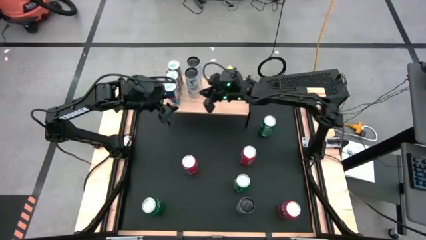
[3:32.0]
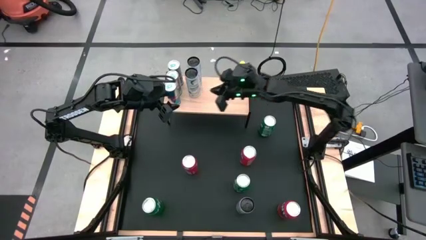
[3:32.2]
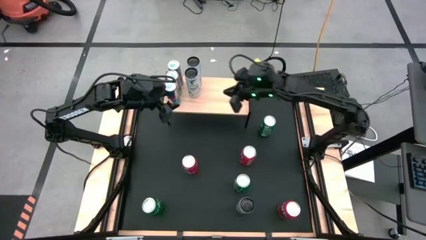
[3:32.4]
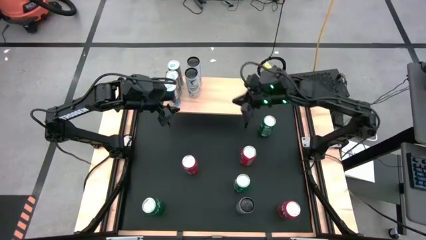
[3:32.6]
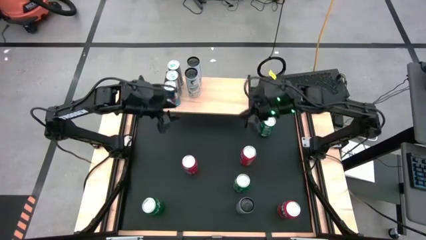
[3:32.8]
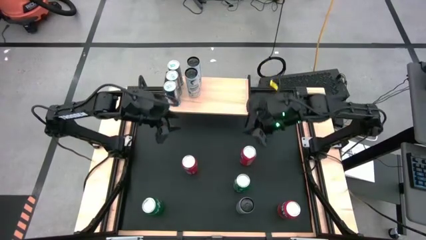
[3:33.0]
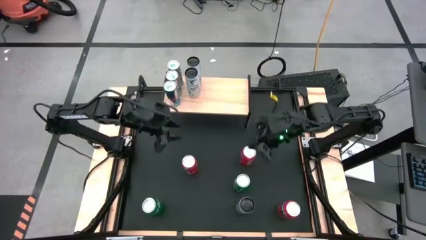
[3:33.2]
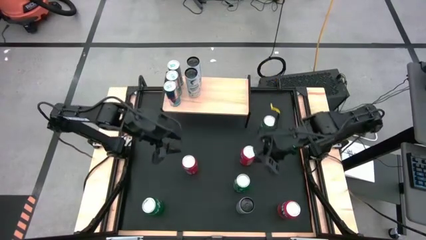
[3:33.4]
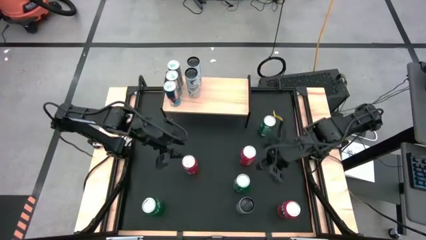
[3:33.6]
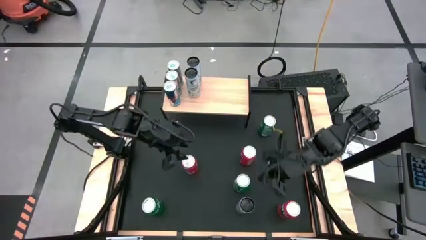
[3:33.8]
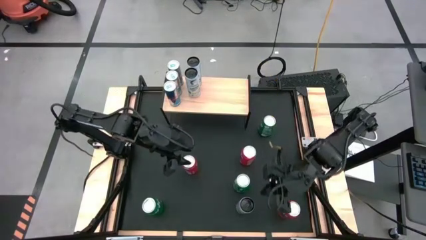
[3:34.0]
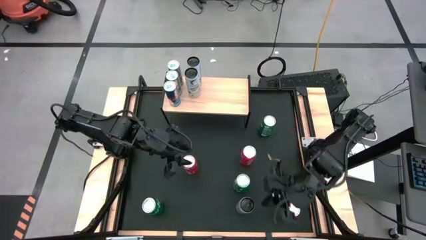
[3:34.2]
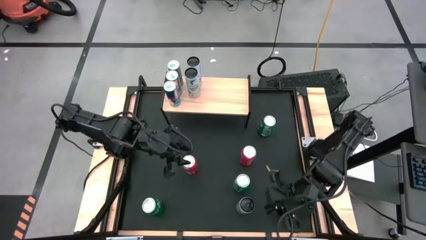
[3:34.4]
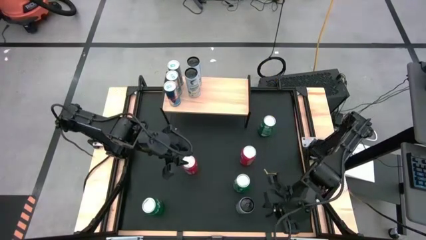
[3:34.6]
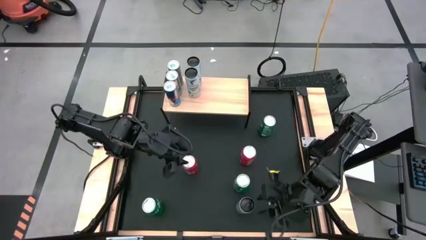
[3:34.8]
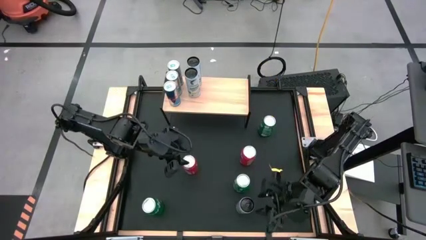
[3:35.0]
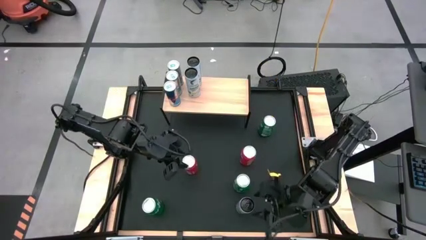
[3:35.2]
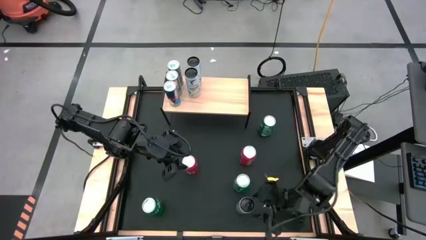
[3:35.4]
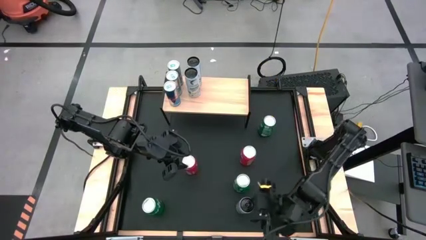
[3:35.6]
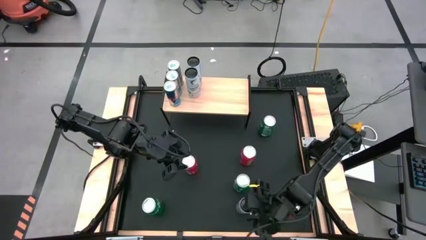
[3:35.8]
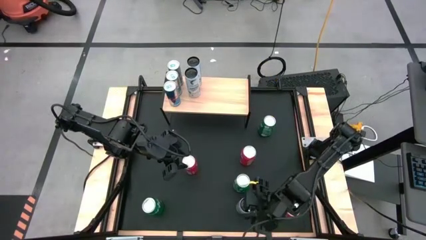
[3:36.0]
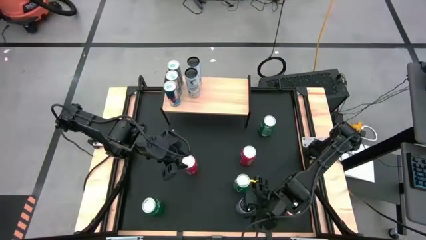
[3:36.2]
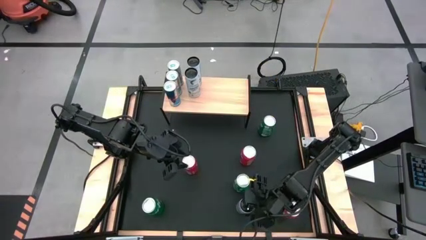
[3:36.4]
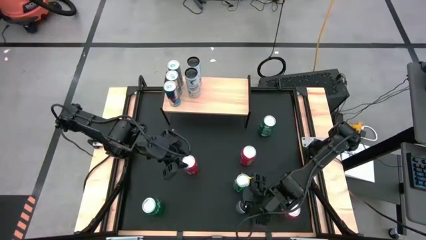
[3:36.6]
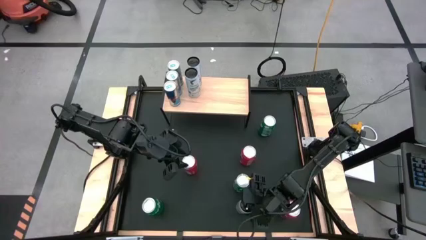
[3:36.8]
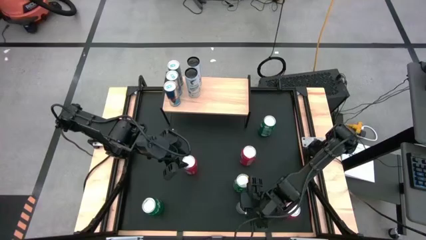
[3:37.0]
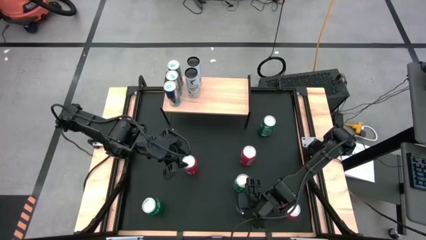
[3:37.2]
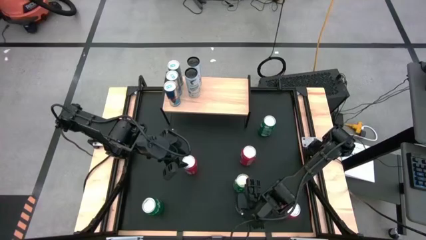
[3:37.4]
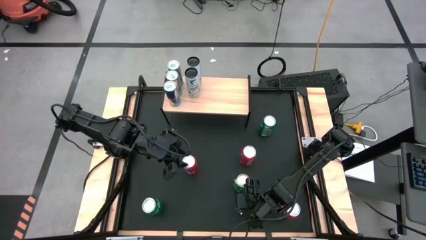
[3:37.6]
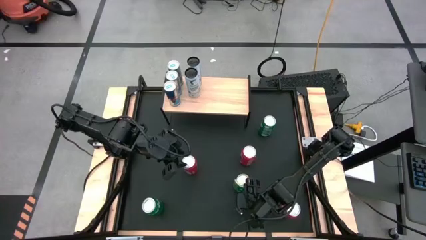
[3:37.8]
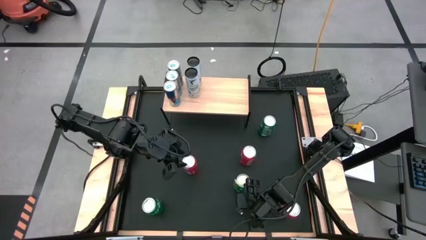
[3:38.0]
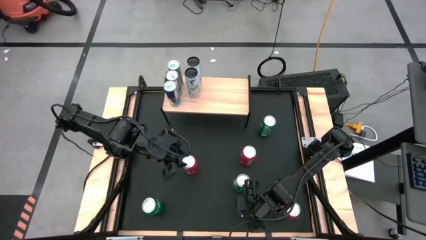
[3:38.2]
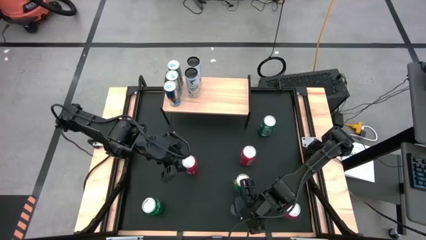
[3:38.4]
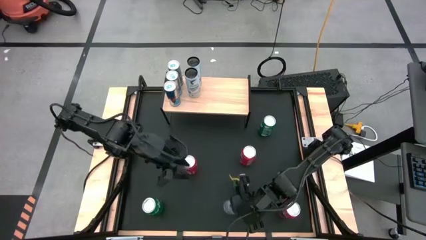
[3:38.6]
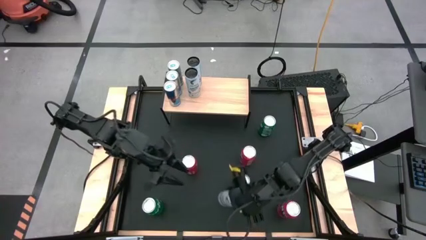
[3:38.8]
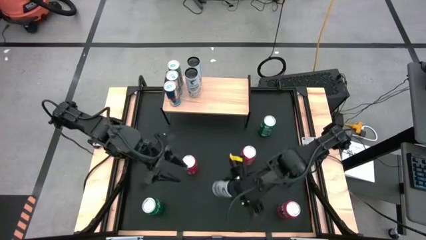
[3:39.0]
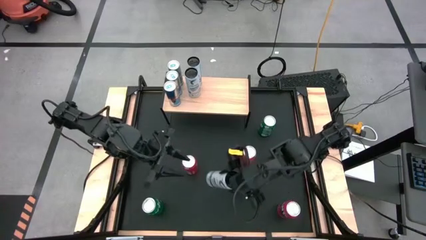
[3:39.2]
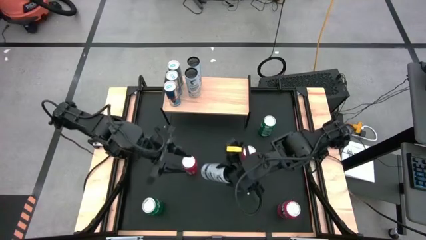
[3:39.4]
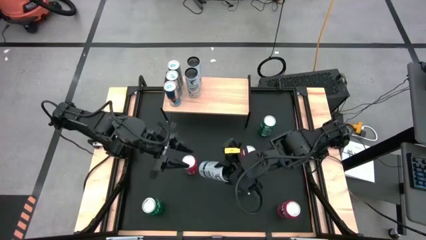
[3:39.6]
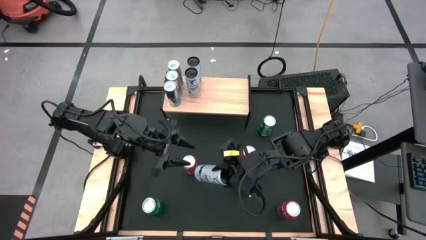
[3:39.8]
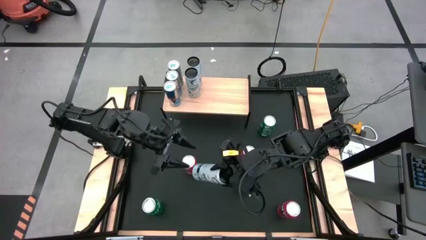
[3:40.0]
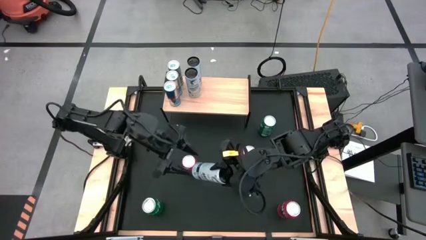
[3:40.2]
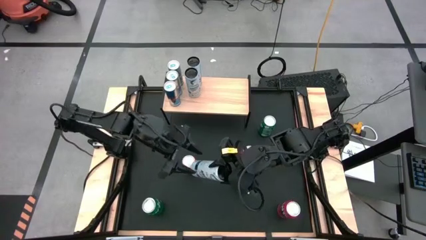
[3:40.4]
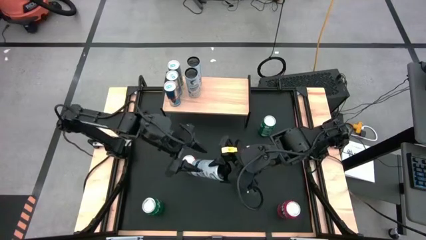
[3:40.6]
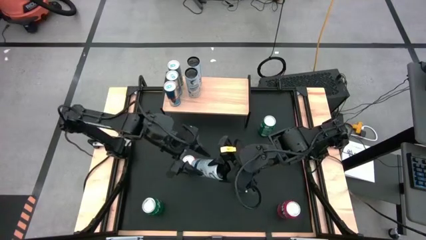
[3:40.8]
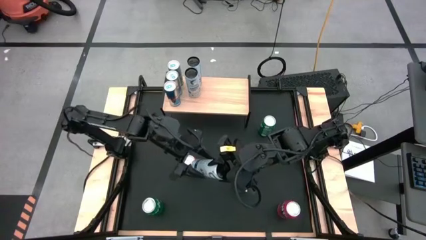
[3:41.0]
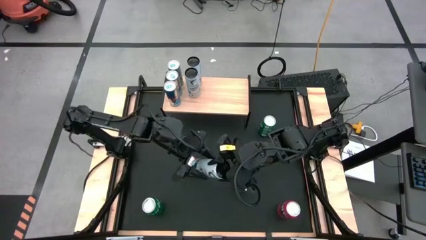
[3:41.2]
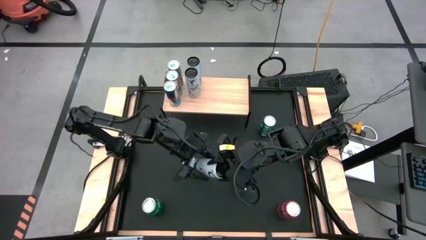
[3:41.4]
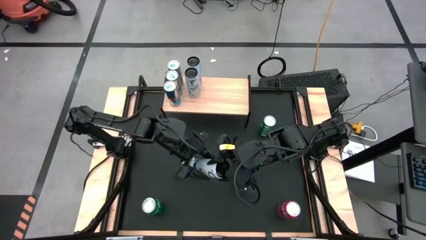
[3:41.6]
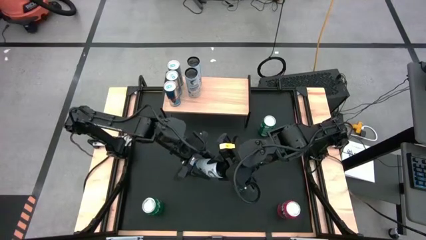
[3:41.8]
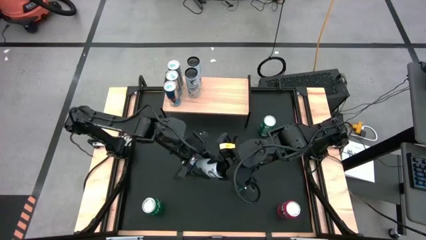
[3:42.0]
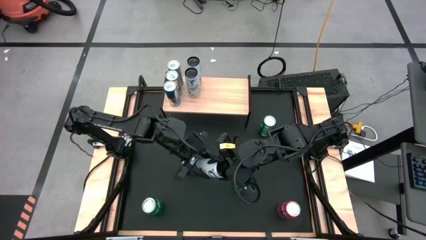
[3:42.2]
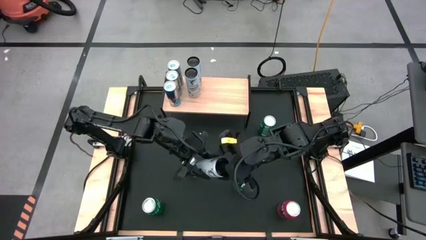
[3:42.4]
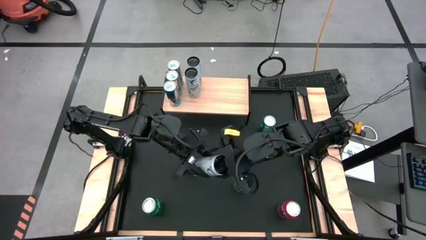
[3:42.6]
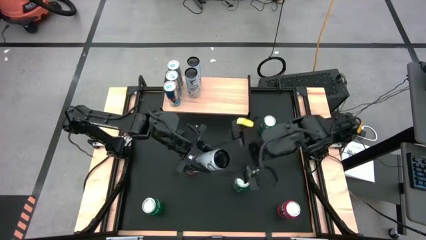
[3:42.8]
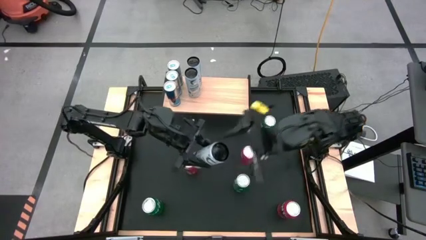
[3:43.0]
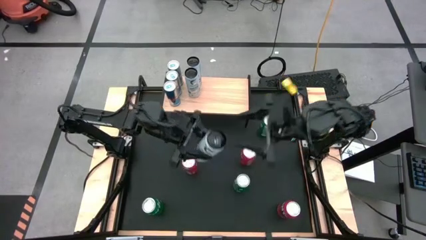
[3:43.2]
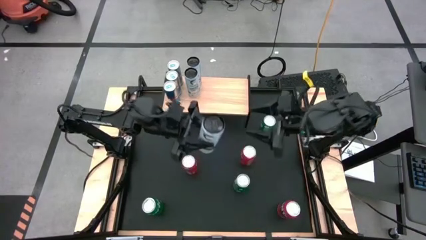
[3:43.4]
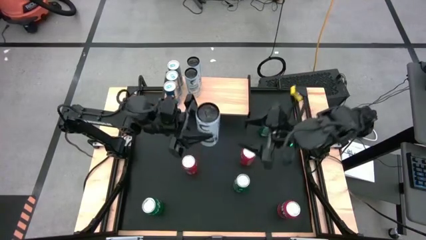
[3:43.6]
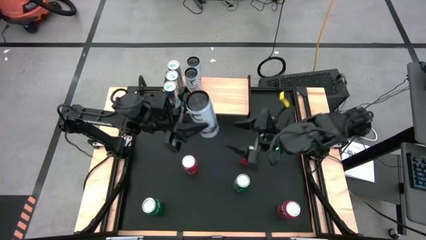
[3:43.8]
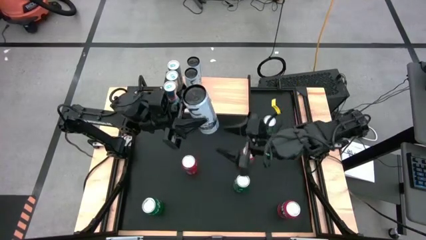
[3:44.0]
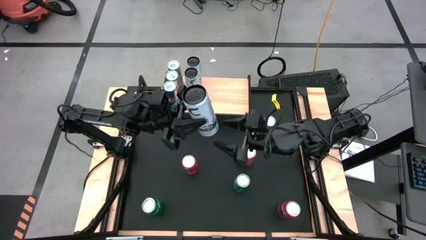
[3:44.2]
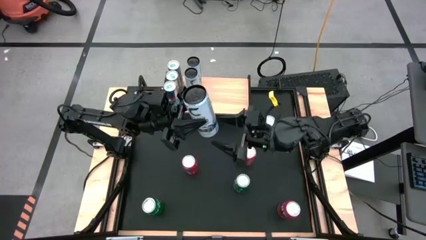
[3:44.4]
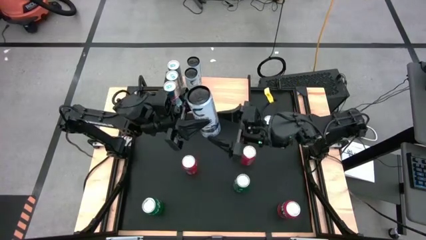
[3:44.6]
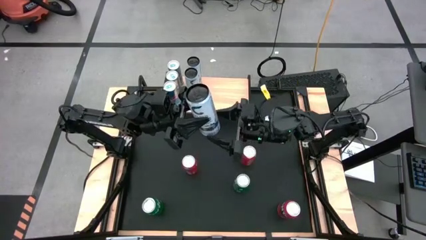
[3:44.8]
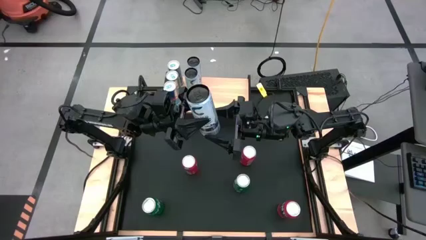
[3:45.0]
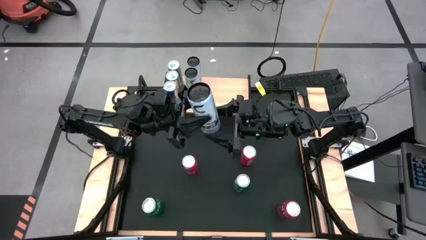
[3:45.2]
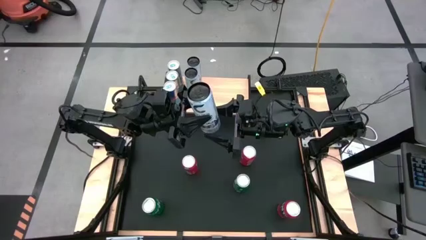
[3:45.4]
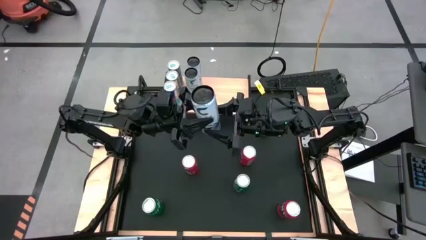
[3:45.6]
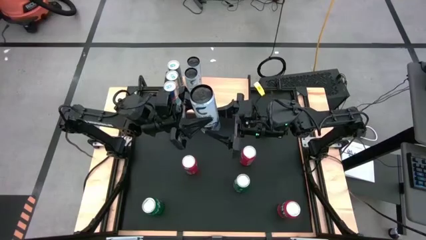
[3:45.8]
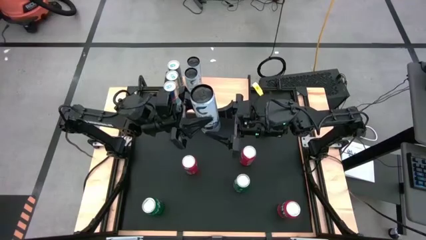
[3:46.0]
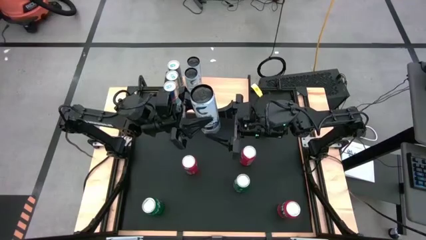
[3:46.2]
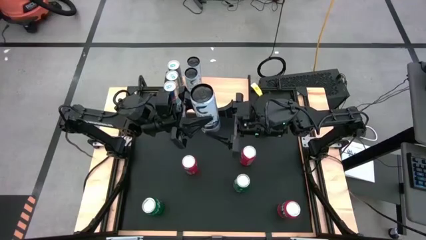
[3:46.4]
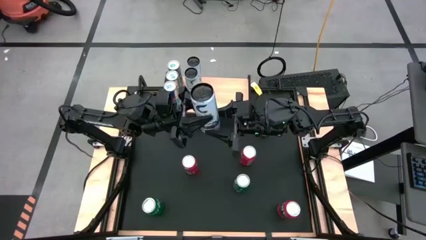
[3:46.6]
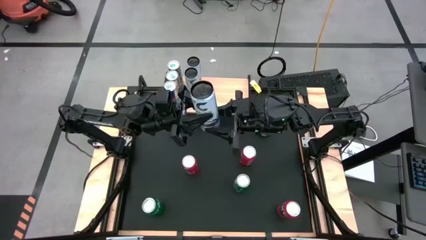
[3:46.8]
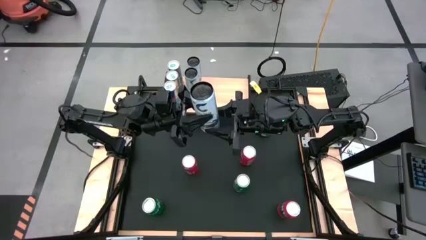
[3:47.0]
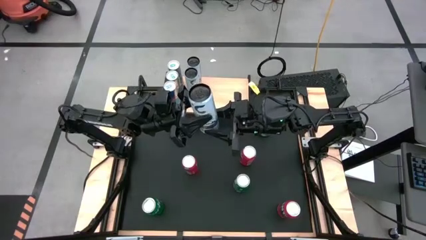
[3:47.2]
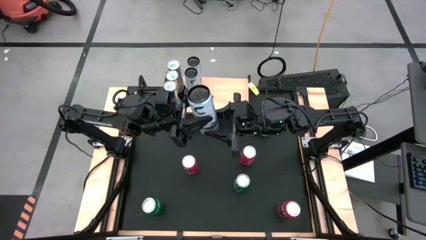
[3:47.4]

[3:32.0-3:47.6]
Task: Place canned beverage on shelf
Put the white-blue soda can on the shelf
